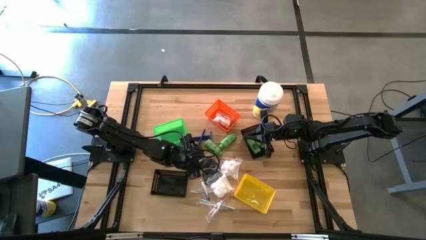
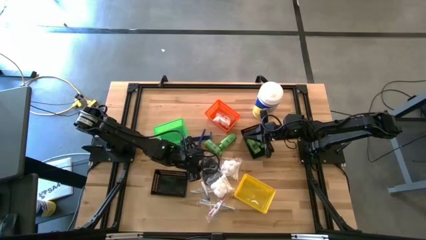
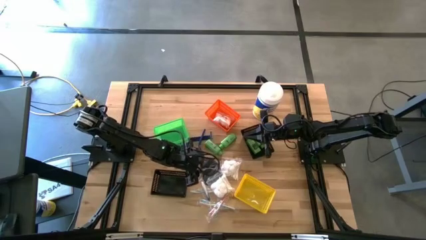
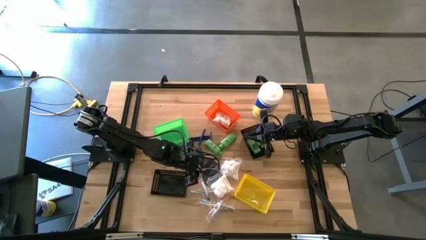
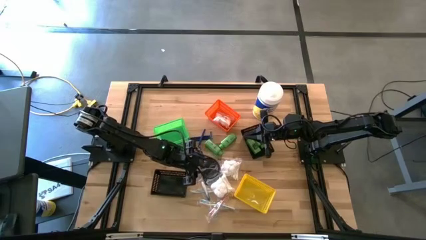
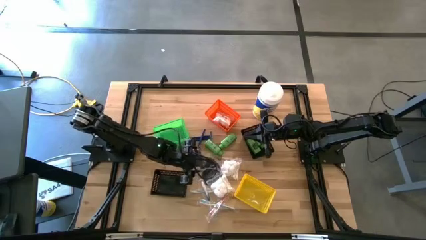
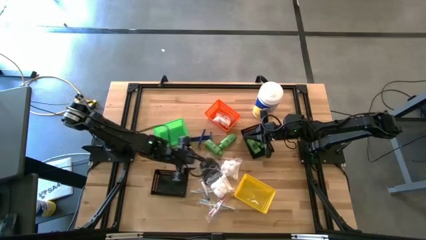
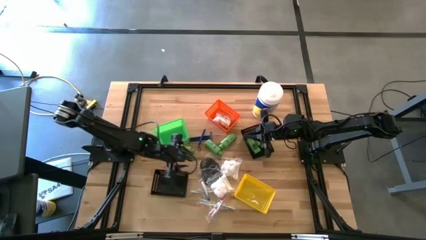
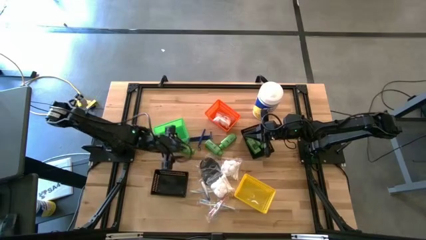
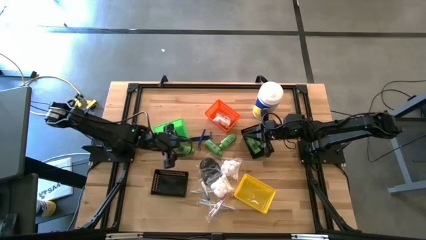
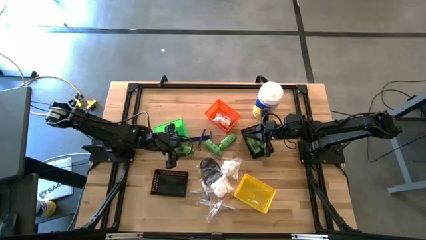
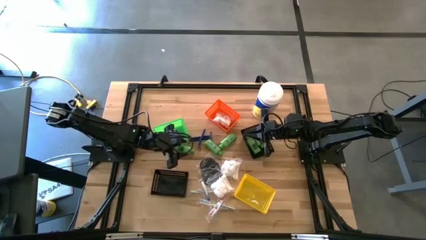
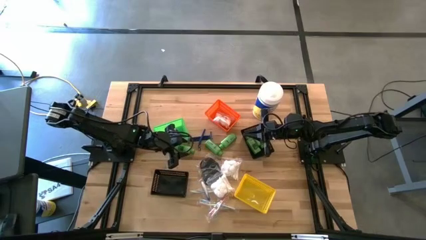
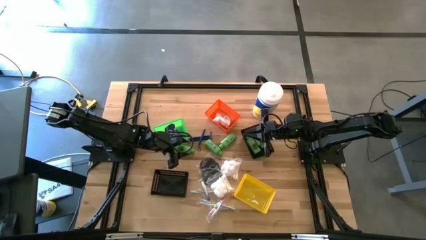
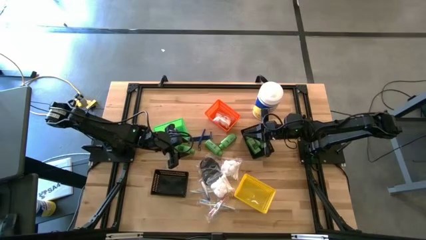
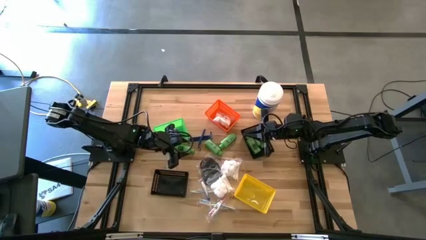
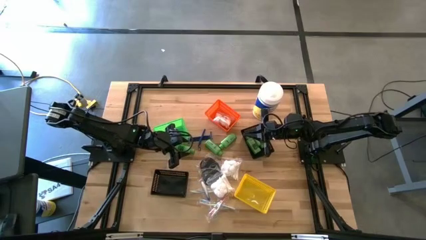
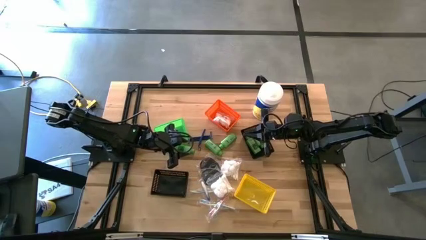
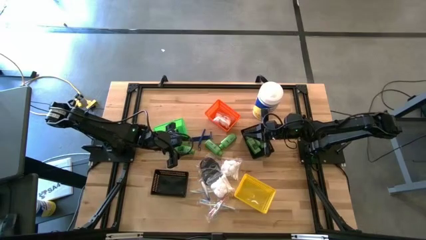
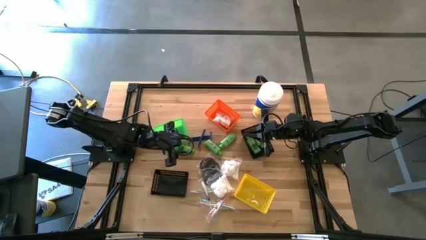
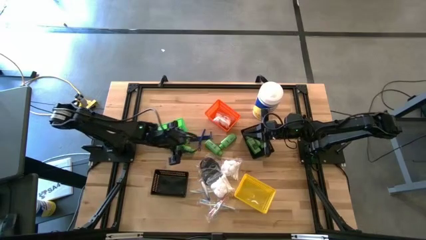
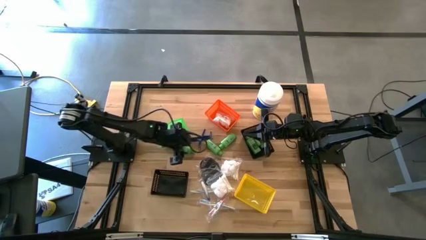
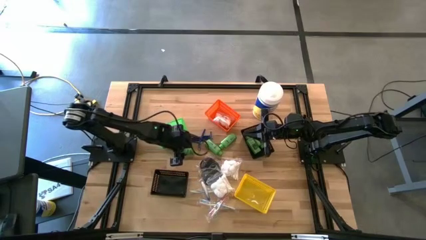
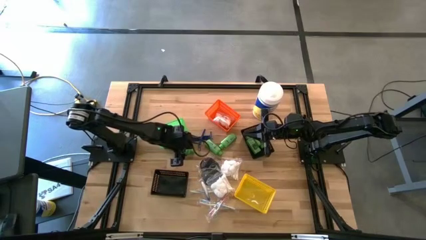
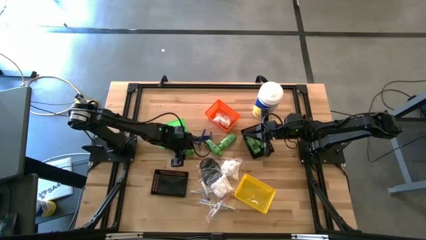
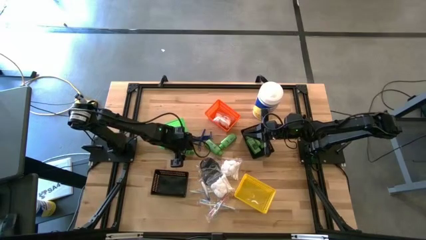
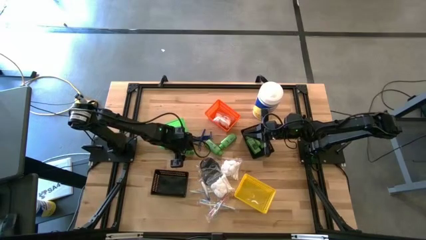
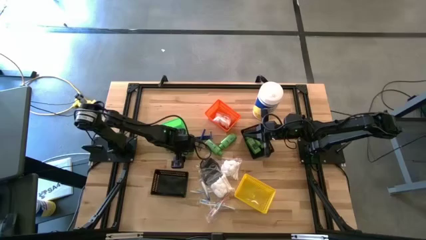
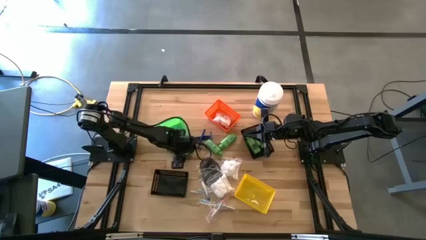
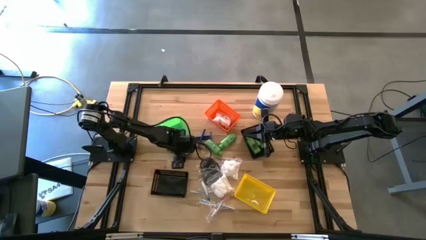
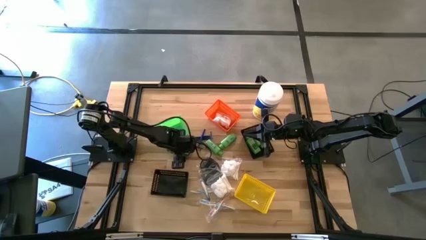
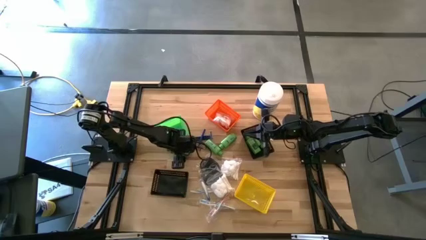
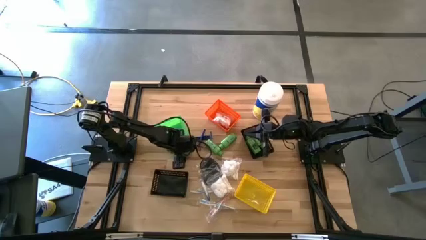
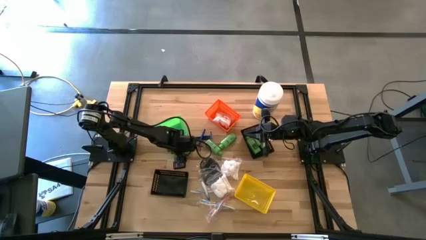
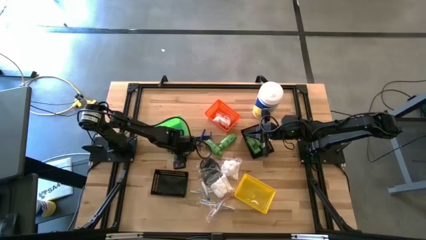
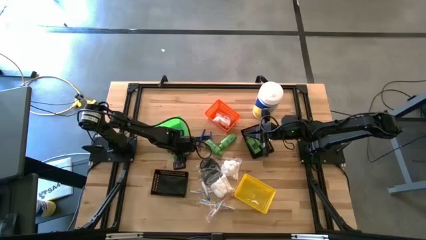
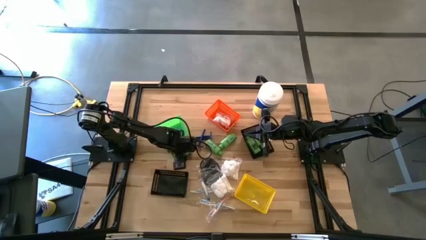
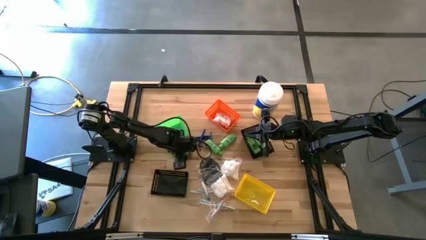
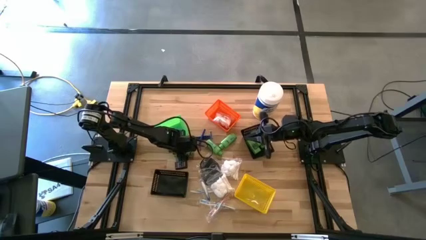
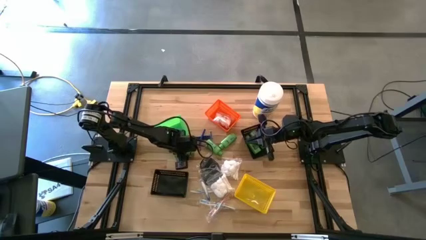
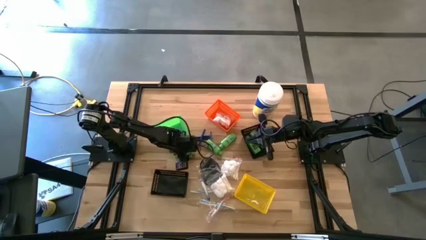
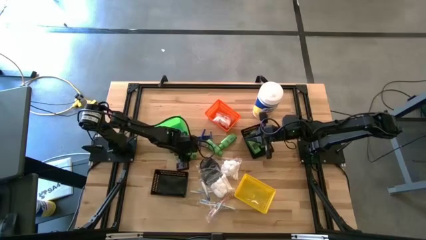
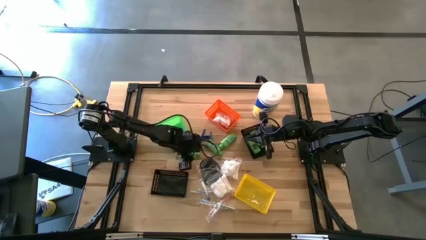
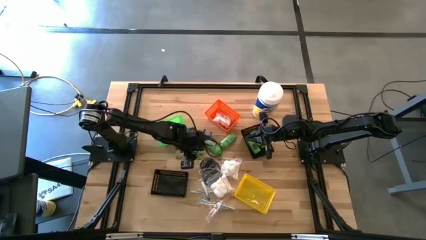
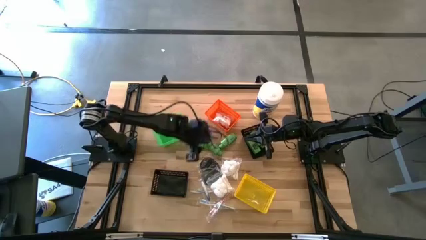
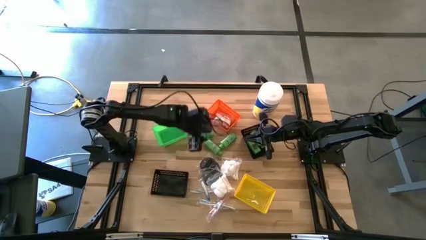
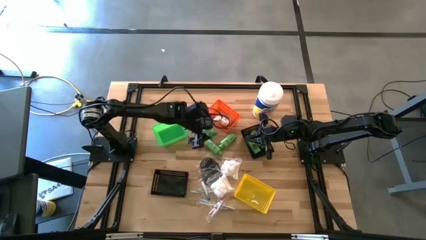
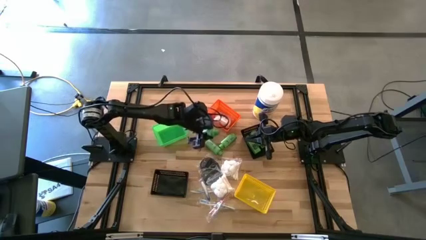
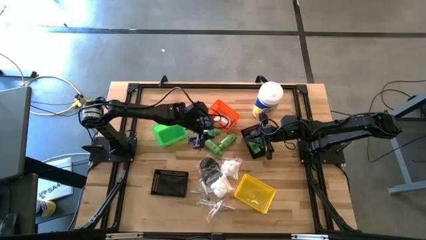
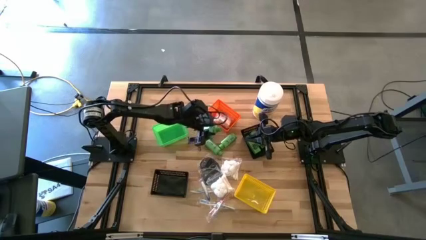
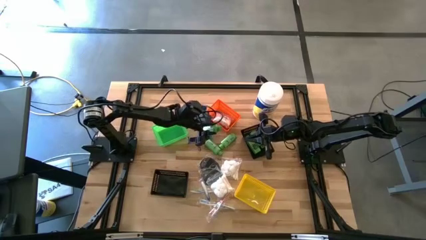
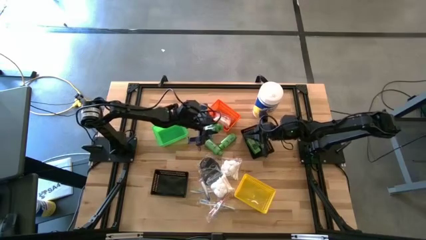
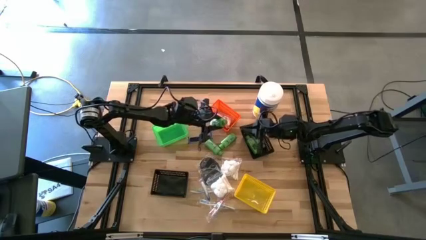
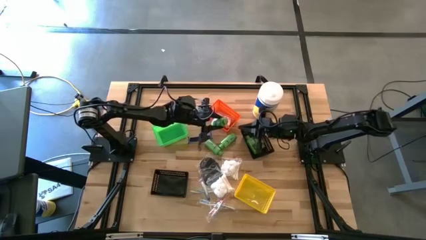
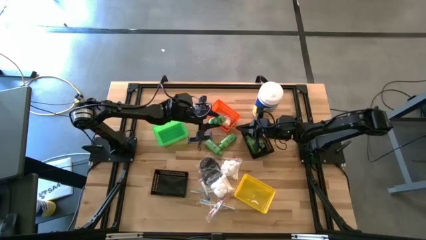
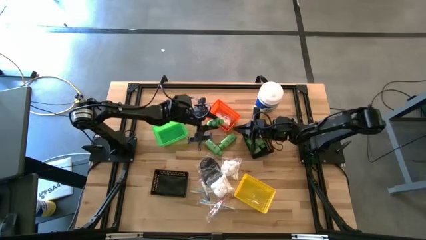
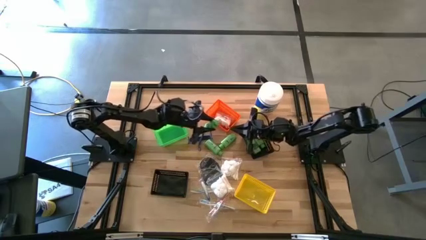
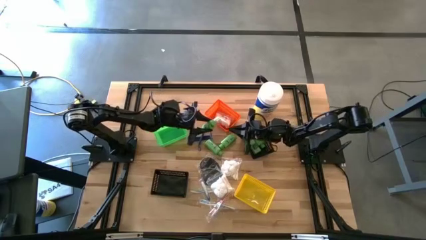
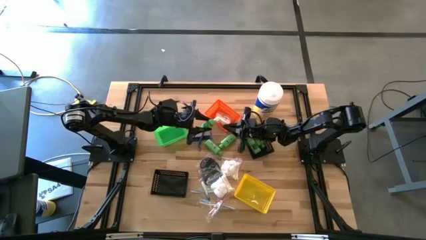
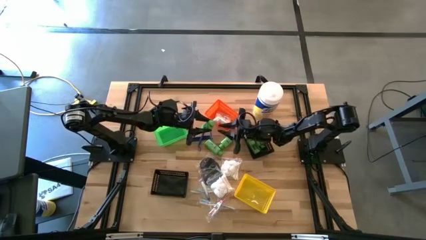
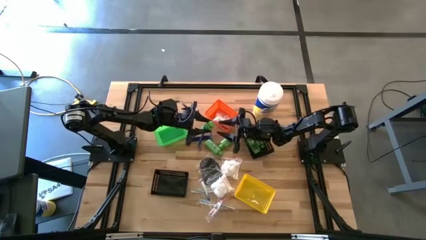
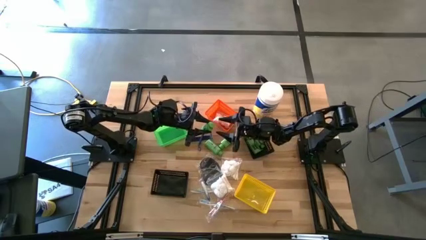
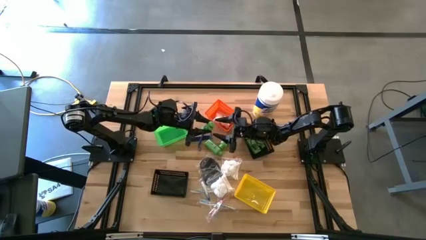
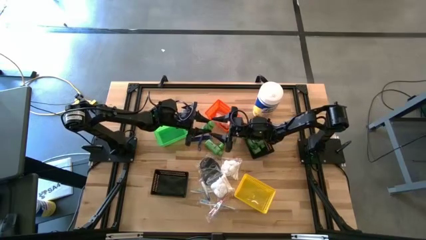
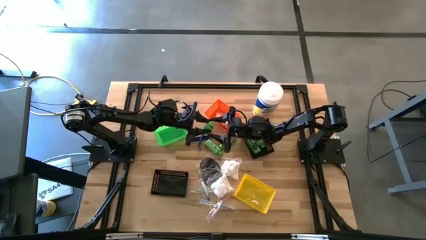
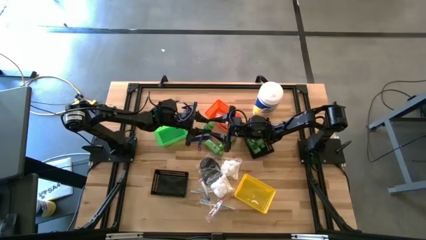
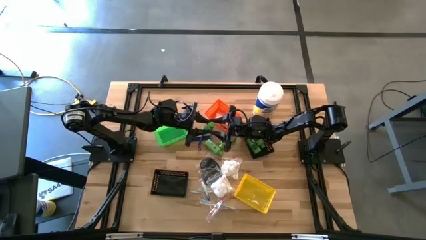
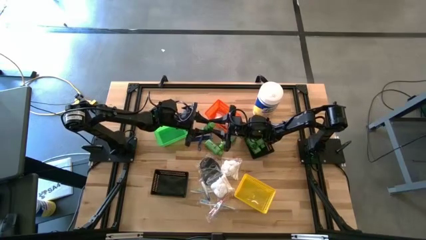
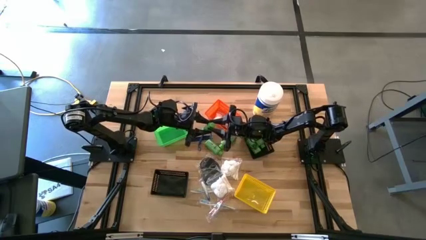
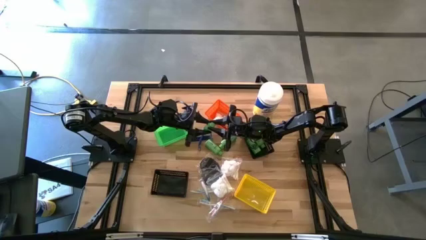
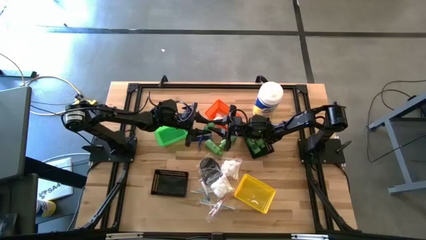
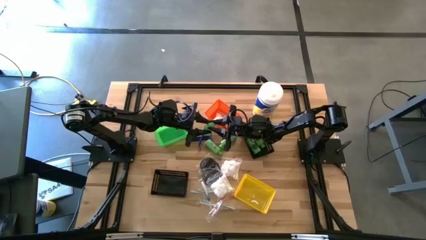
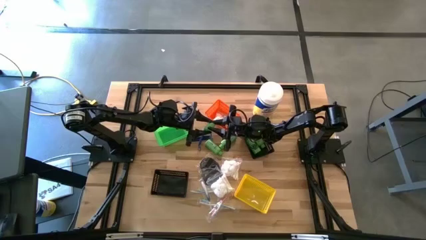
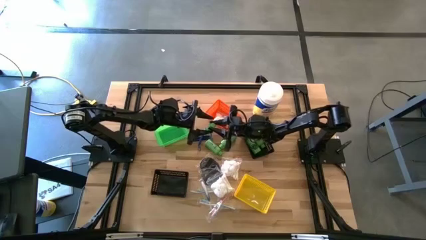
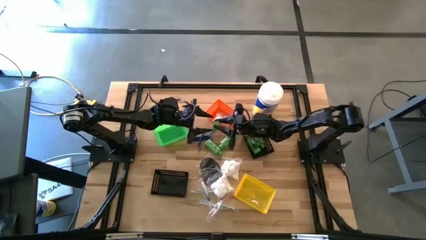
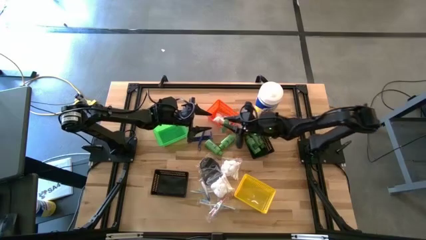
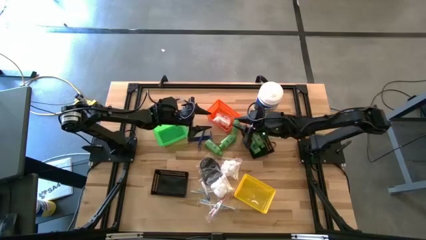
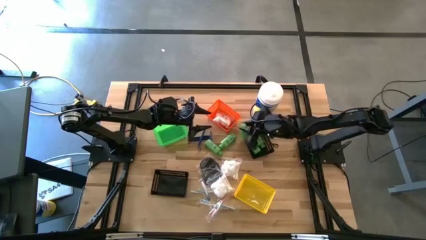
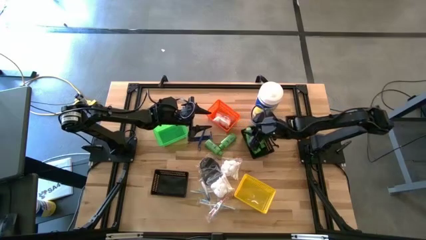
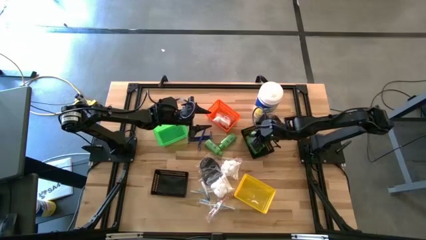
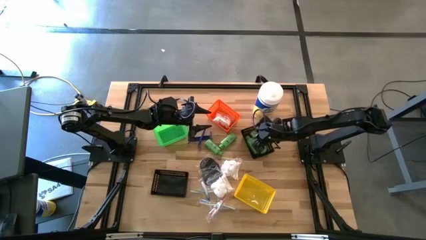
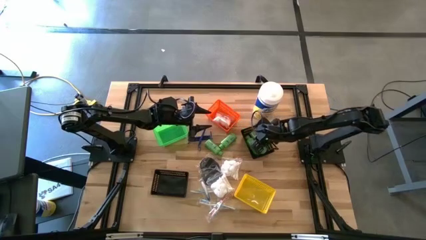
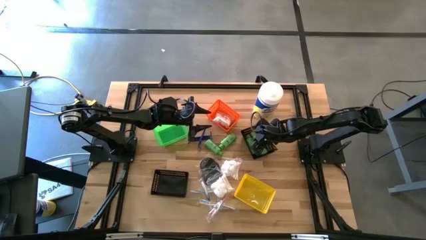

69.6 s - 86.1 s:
Task: Pick & Place Travel size toiletries
Put the green shampoo into the top black bin
